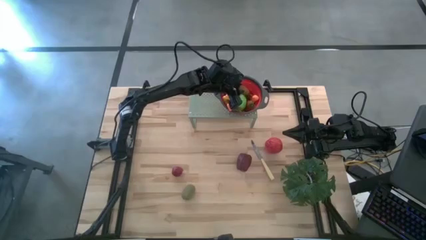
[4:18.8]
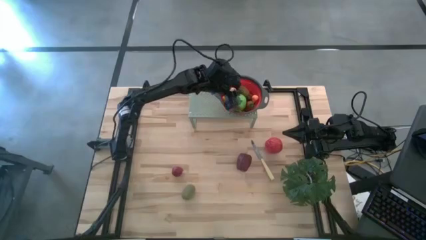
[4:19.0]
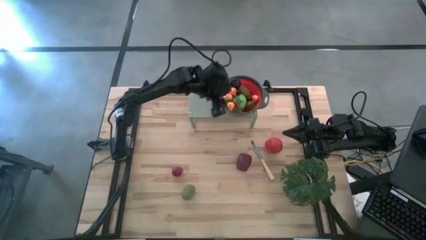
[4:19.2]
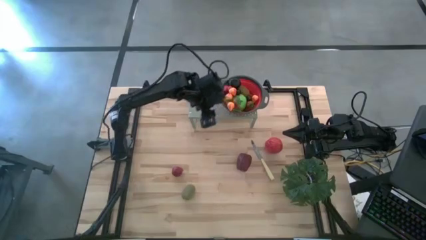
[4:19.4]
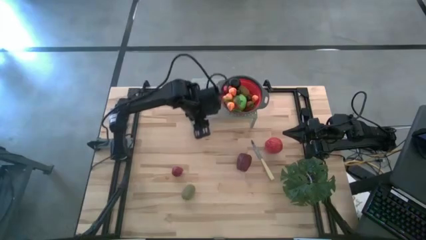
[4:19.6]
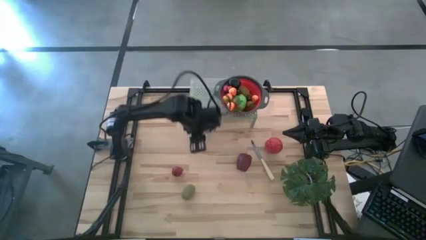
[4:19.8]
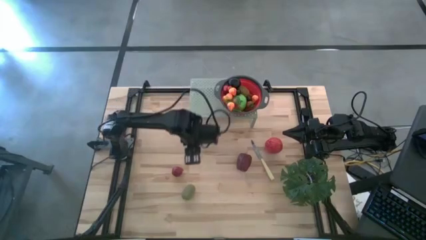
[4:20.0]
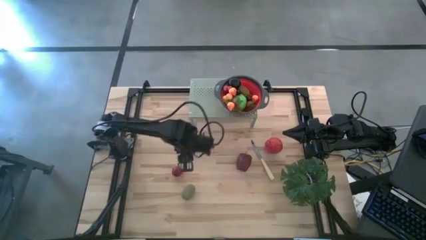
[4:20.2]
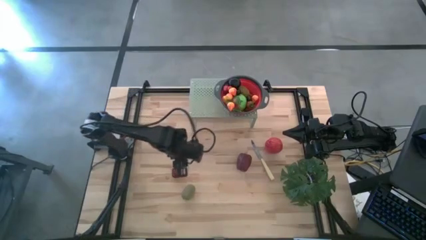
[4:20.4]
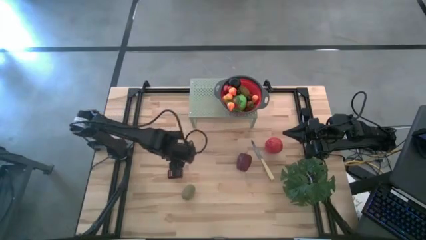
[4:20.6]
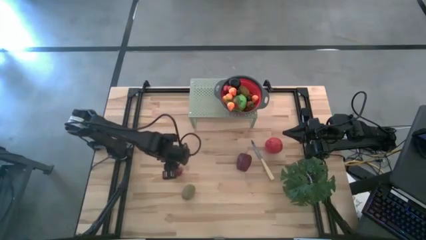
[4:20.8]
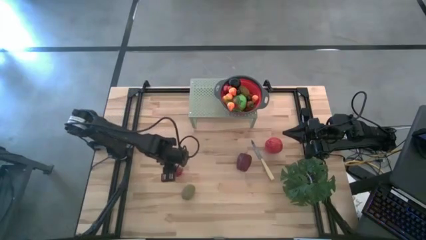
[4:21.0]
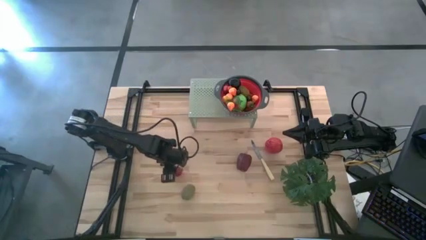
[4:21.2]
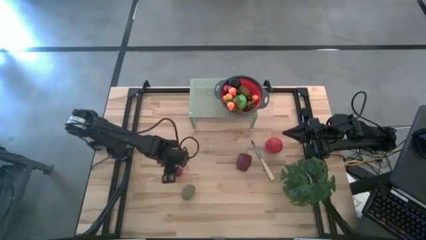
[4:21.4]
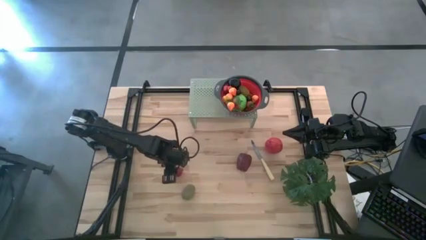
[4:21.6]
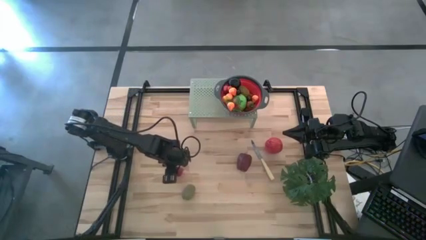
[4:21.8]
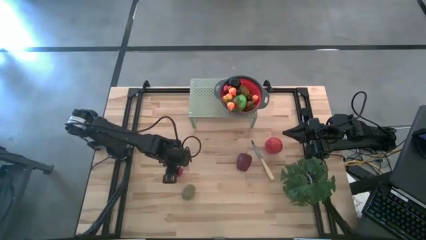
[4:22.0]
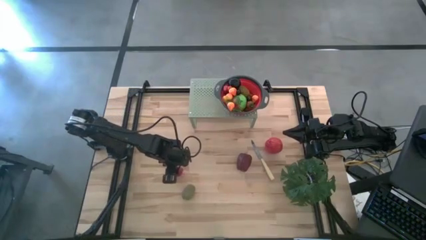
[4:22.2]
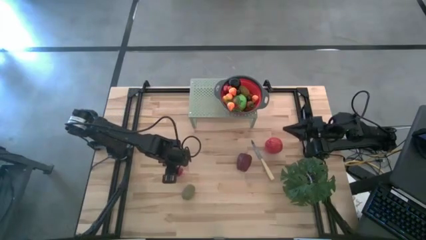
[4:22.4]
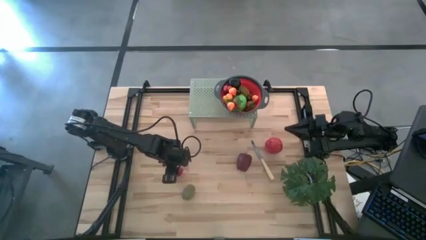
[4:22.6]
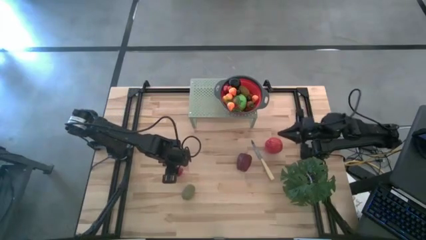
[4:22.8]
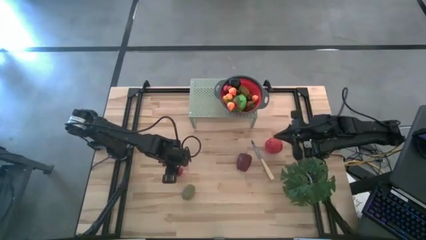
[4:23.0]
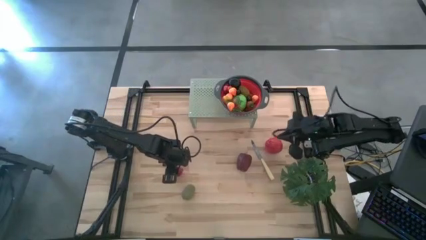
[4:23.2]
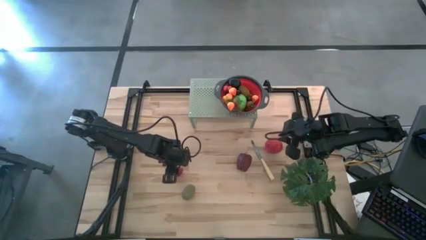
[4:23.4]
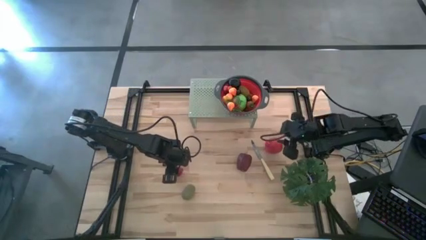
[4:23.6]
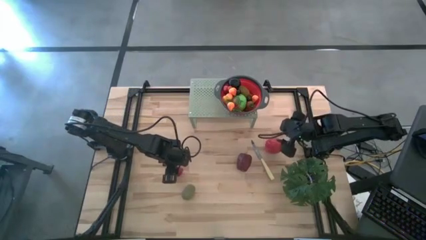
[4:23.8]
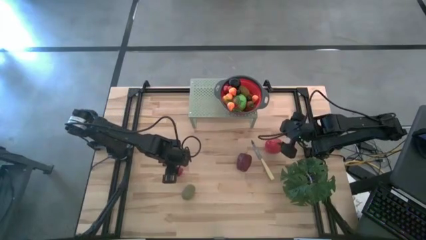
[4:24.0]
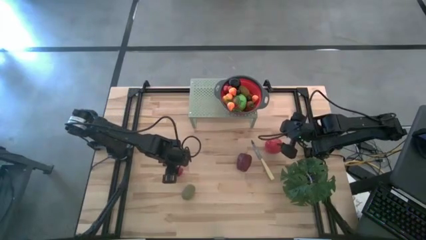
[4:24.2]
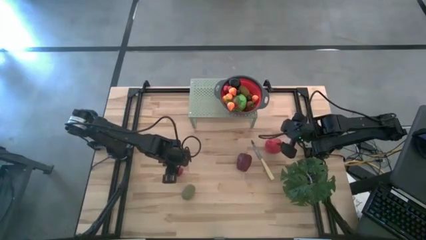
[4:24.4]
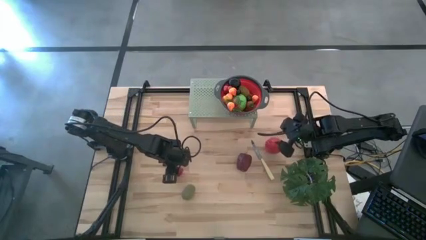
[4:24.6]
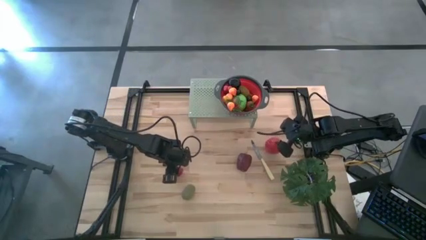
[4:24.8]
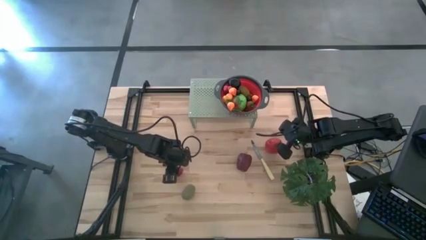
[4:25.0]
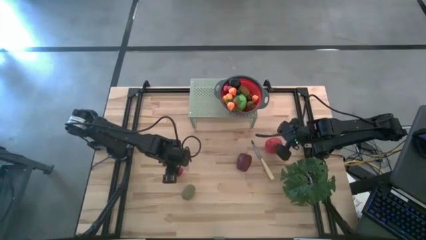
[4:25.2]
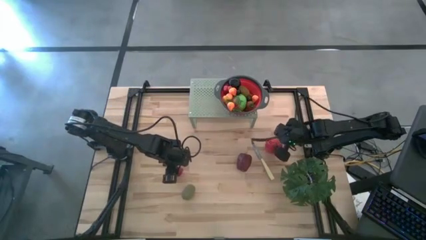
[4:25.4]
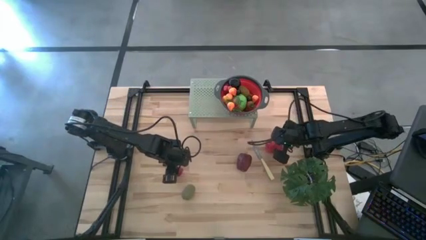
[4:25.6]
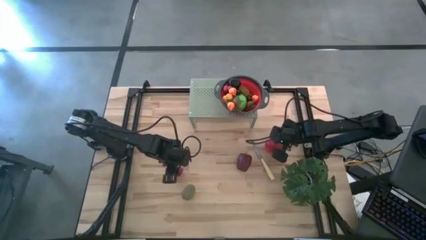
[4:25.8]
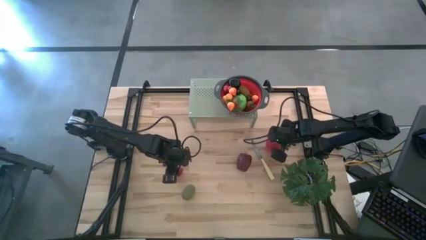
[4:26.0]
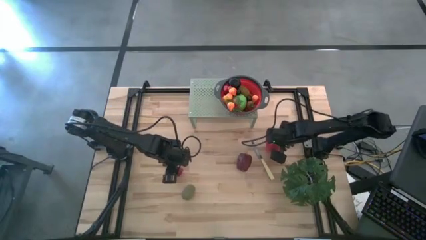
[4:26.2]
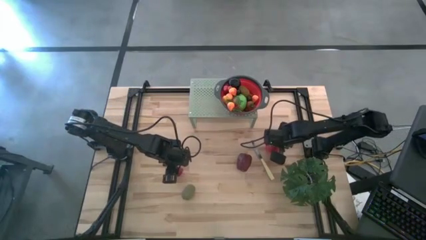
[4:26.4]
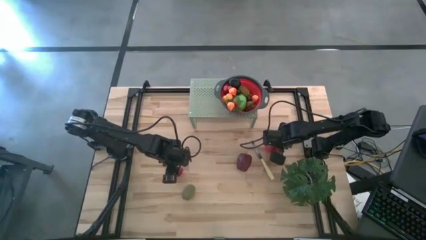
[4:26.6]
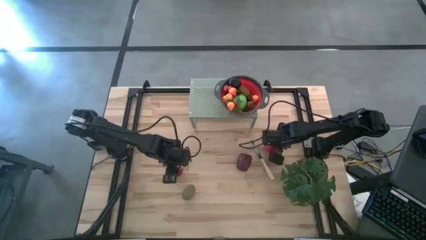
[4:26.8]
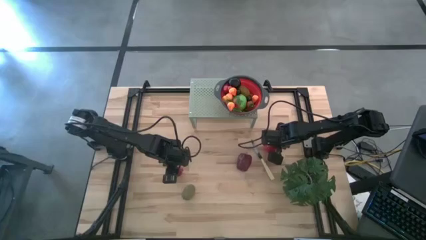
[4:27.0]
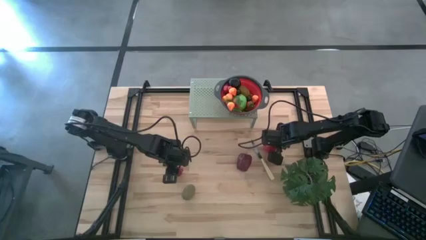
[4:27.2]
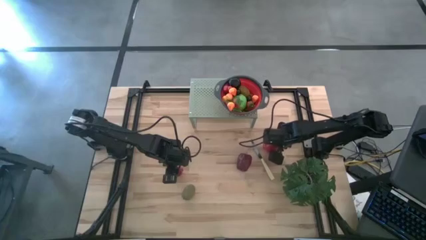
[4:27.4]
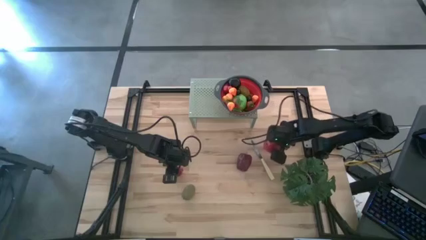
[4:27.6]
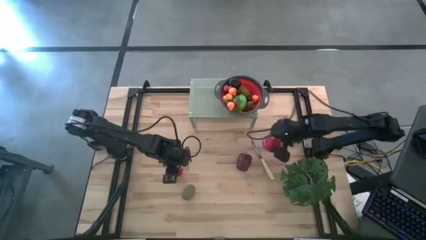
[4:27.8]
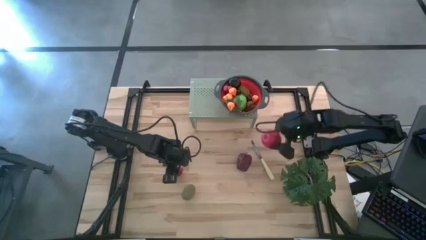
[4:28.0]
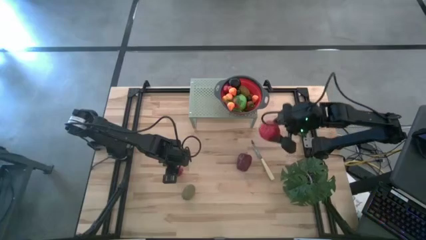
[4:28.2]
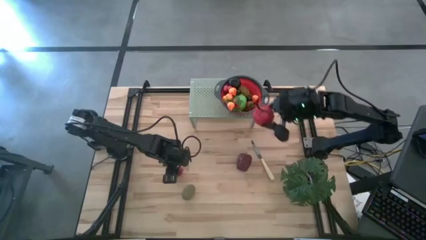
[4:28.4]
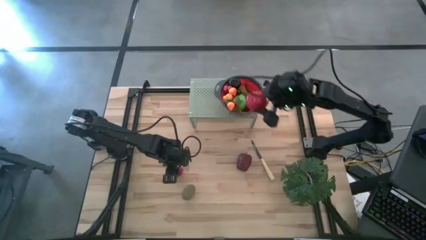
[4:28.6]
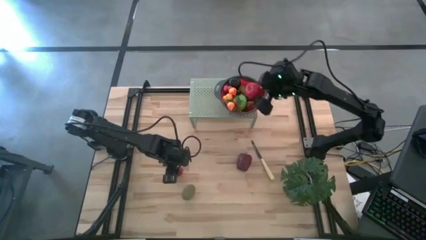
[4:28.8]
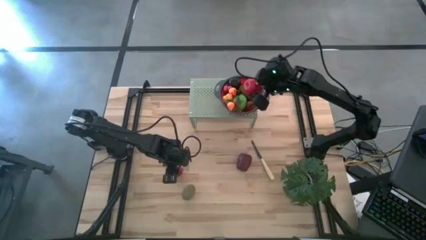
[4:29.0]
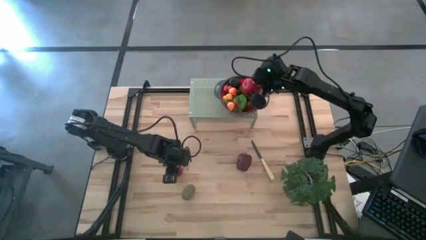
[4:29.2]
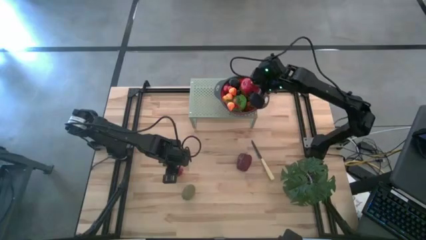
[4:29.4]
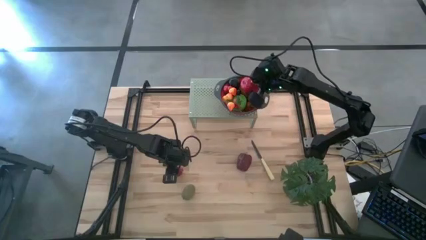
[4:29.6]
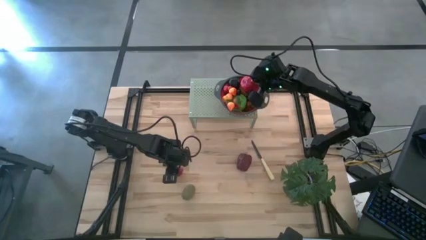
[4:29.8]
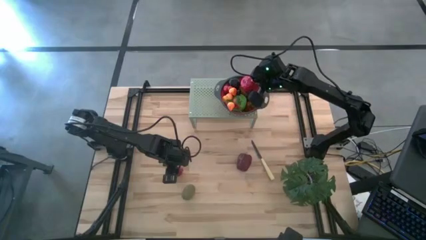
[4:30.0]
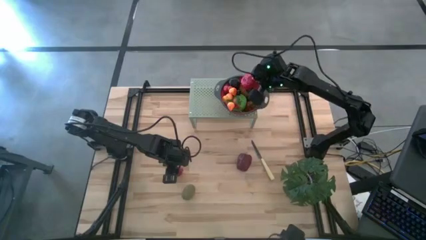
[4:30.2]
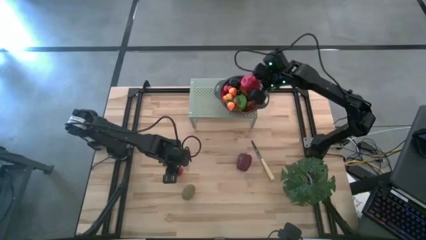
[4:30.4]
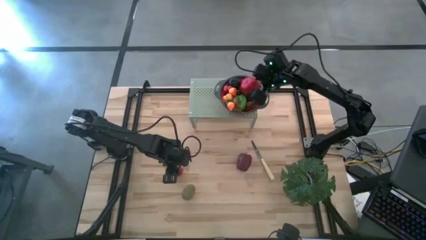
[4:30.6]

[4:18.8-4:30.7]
Task: Pick & Place Fruit
Put the red apple into the black strainer bowl on the shelf

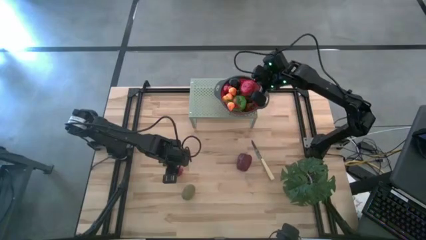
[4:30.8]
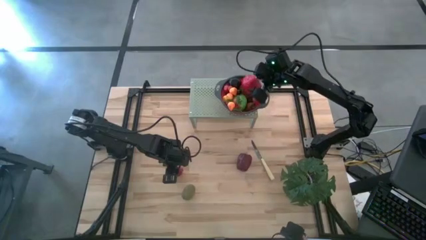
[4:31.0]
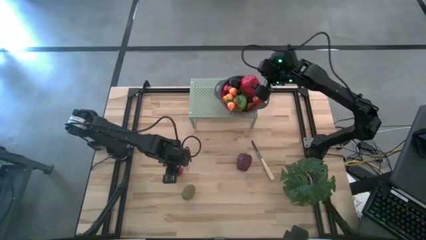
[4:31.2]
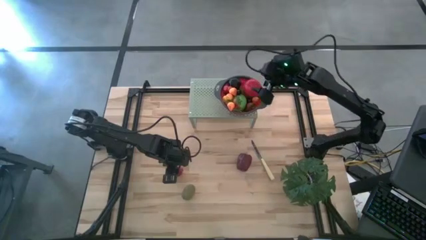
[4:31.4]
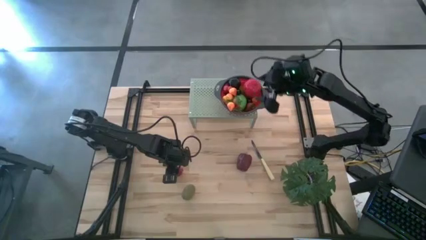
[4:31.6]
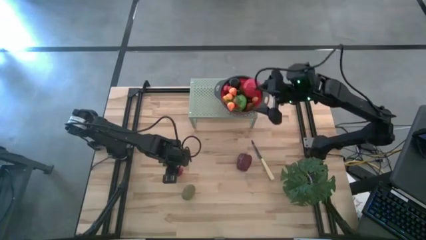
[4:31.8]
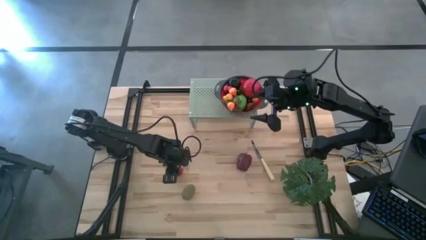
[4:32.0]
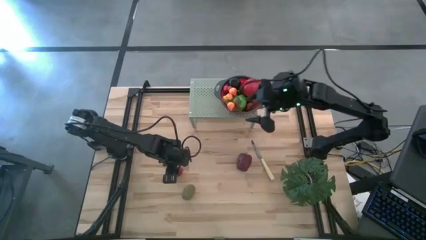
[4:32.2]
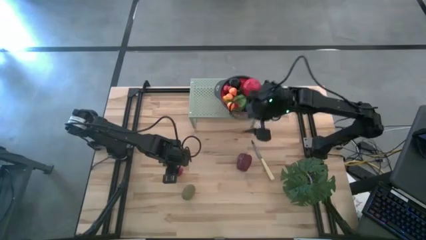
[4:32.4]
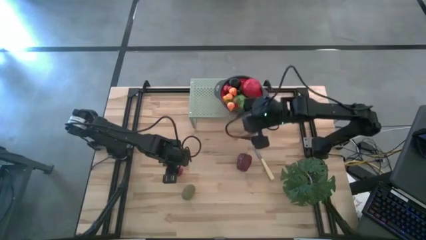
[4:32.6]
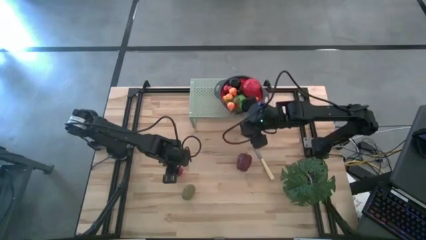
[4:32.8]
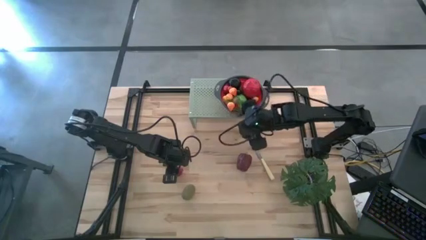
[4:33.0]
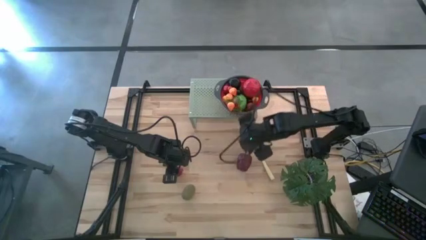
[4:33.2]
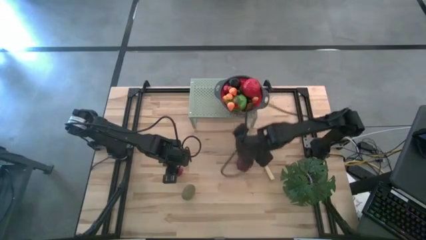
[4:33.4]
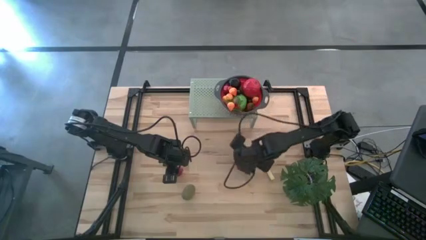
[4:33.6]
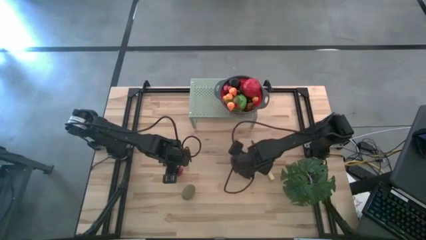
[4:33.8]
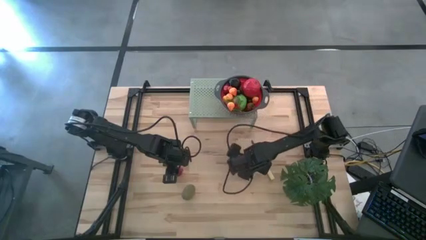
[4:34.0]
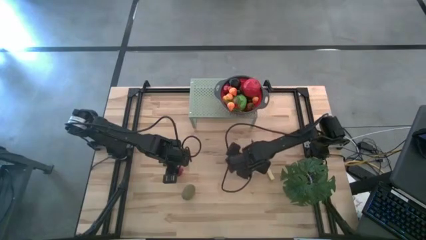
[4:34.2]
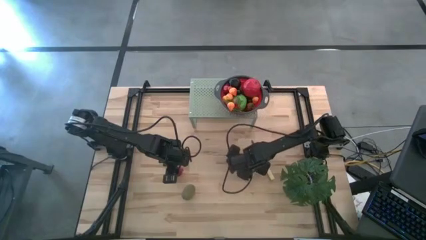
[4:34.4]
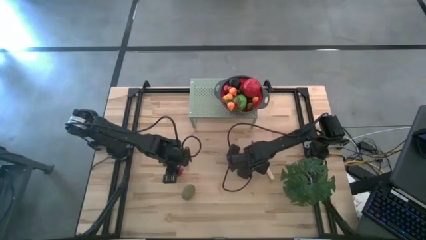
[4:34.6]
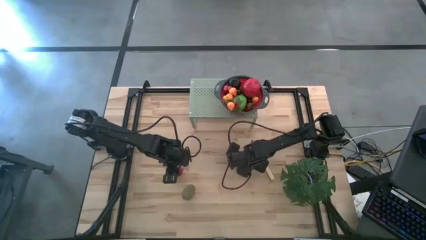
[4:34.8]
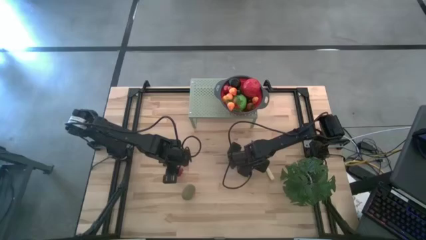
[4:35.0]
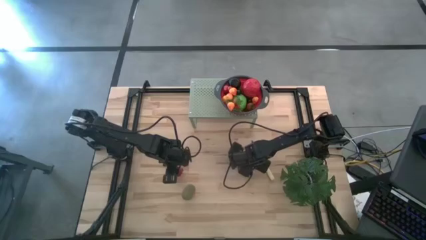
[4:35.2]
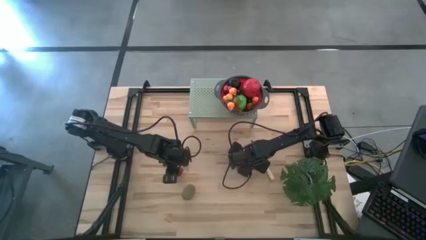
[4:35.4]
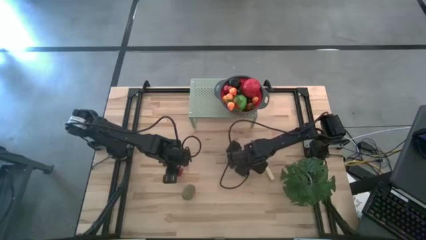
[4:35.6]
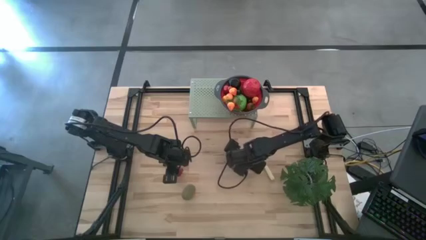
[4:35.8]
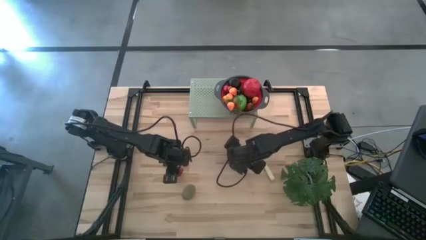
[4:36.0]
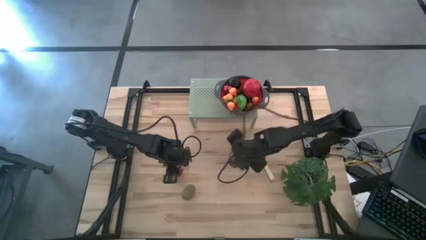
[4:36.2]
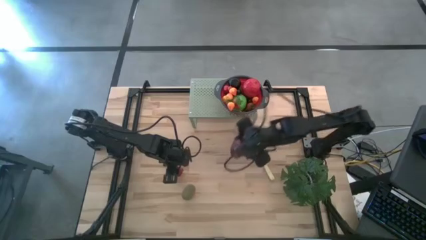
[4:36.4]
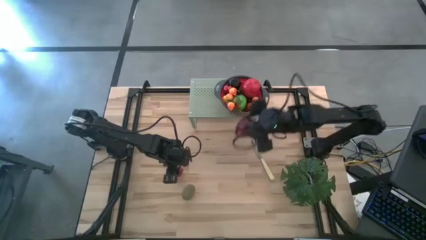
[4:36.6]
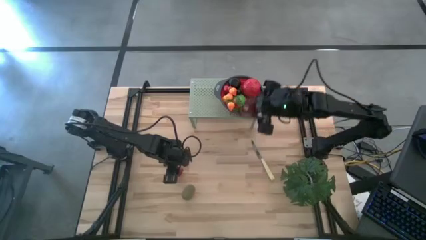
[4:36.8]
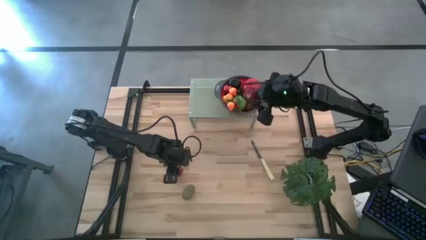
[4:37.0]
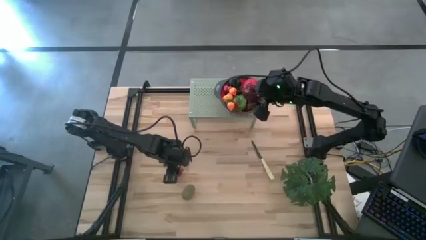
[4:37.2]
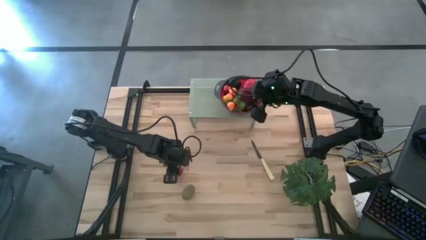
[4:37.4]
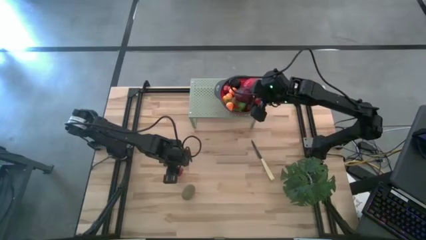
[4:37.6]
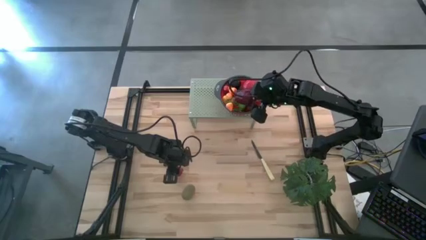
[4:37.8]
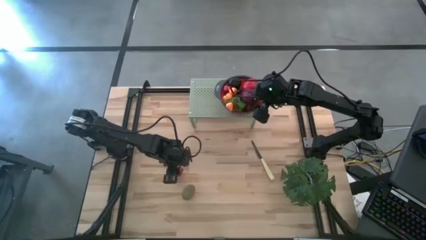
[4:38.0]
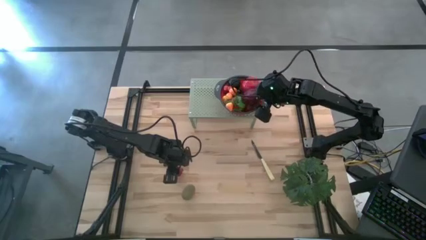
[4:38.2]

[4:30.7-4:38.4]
Put the dark red apple into the black strainer bowl on the shelf
